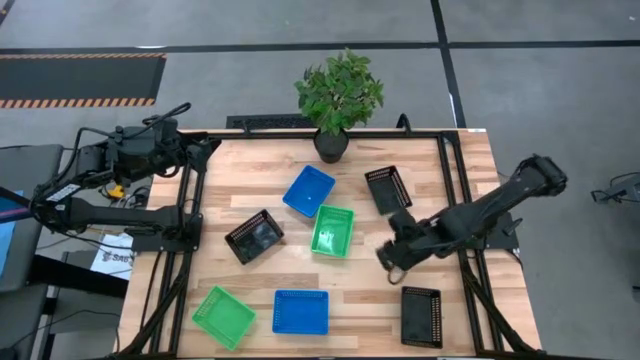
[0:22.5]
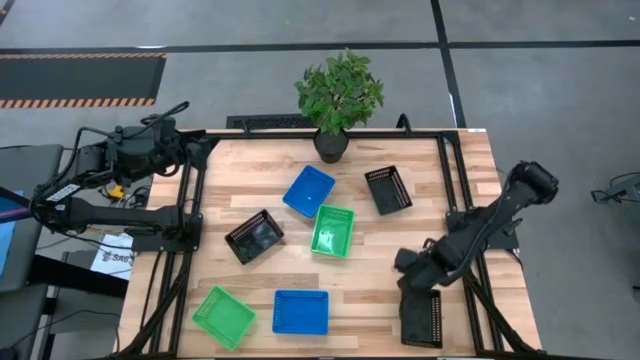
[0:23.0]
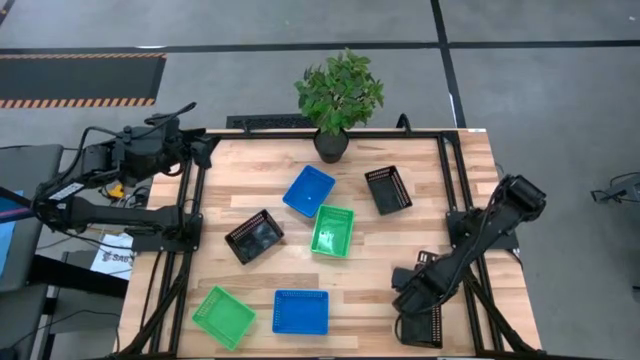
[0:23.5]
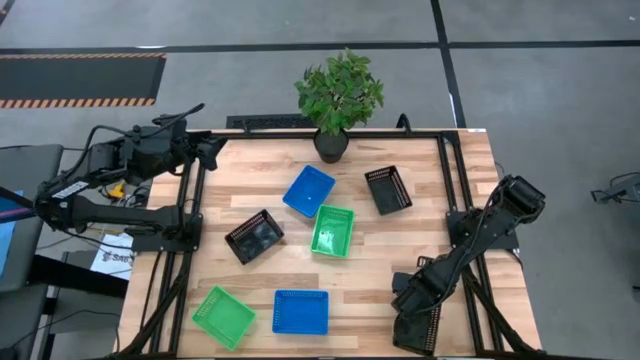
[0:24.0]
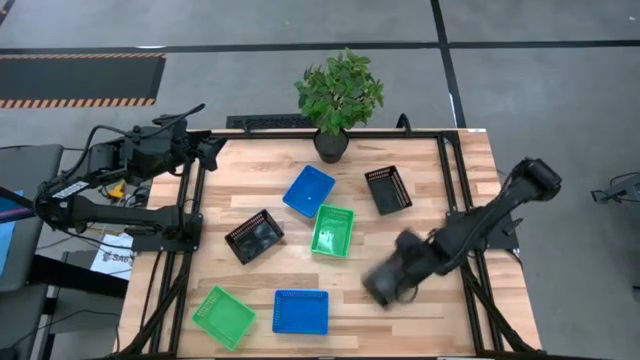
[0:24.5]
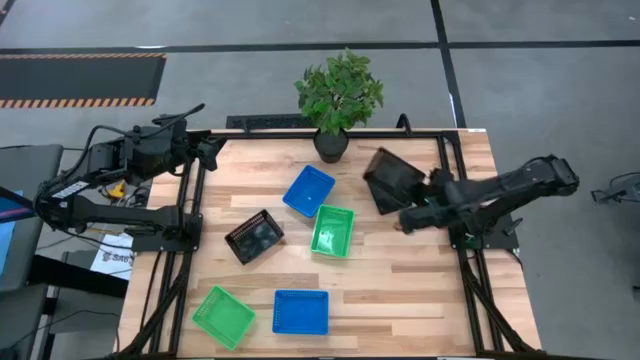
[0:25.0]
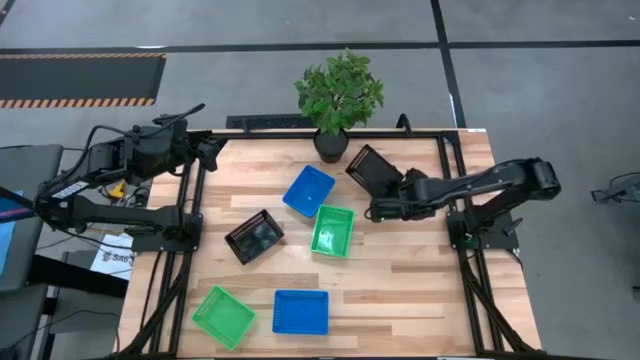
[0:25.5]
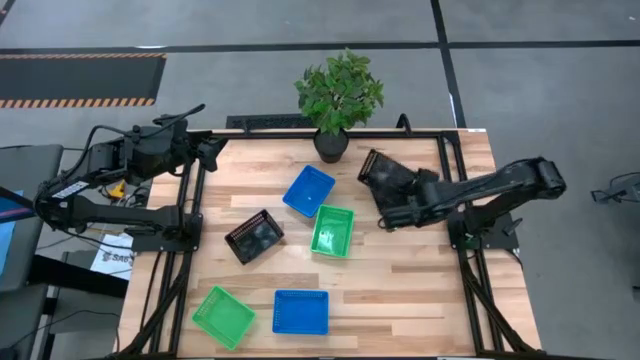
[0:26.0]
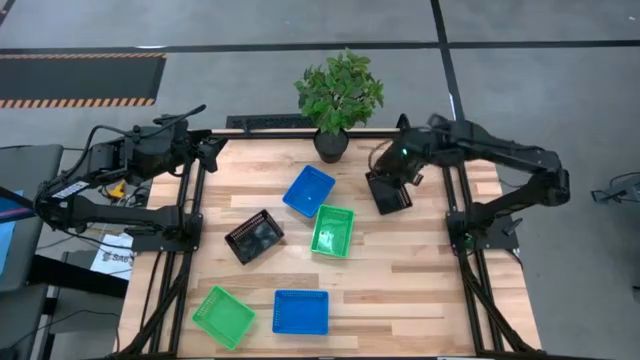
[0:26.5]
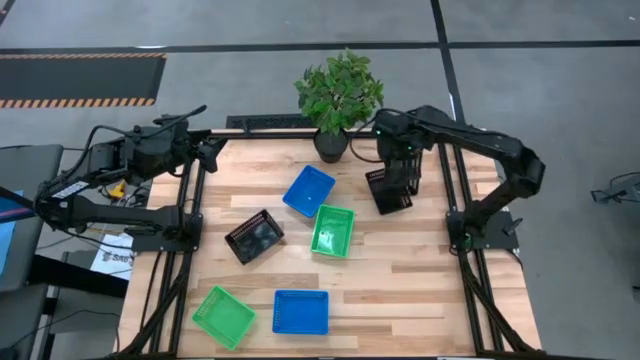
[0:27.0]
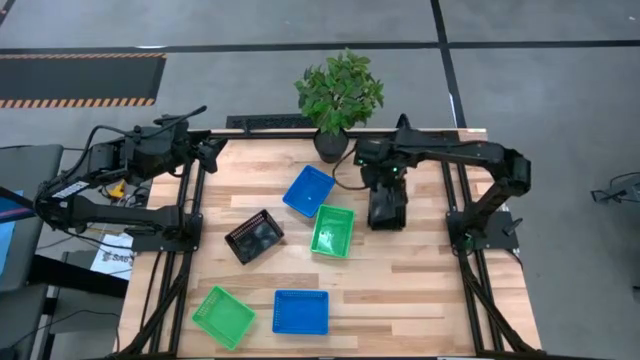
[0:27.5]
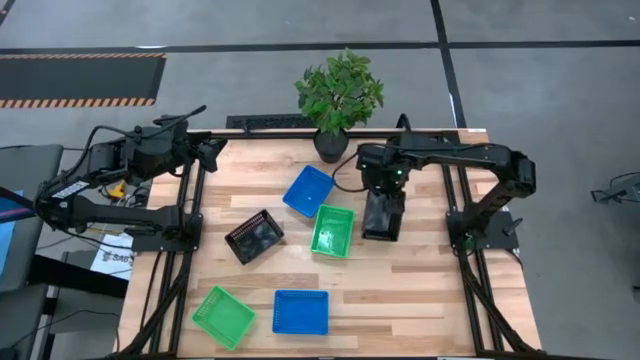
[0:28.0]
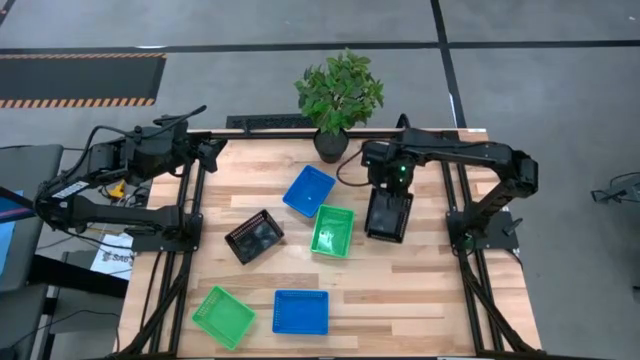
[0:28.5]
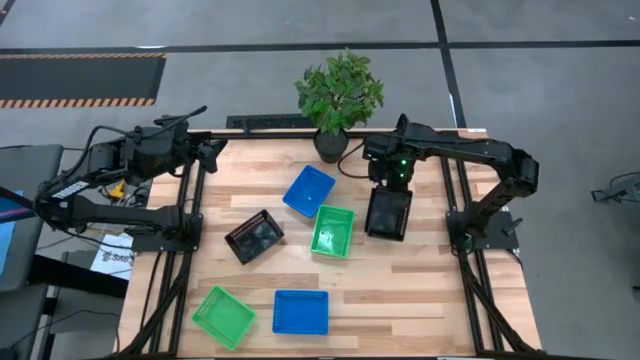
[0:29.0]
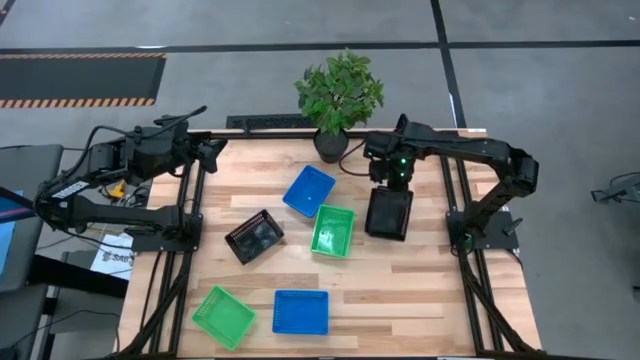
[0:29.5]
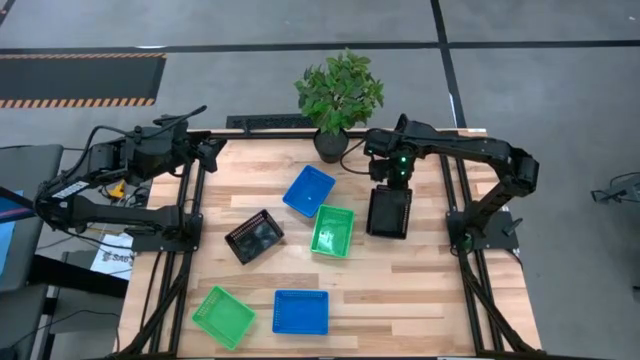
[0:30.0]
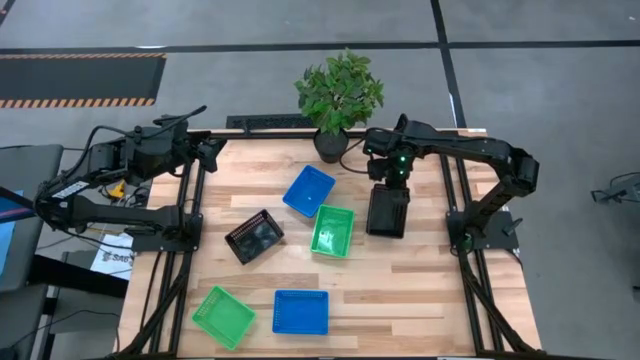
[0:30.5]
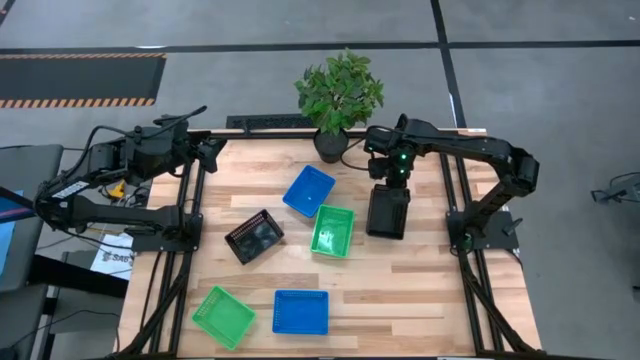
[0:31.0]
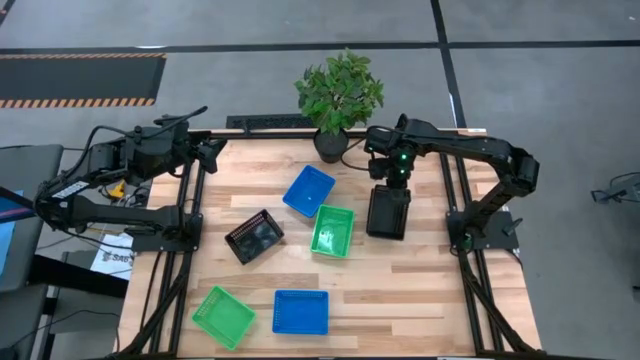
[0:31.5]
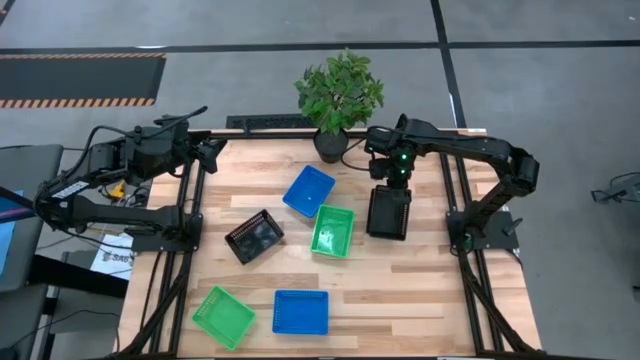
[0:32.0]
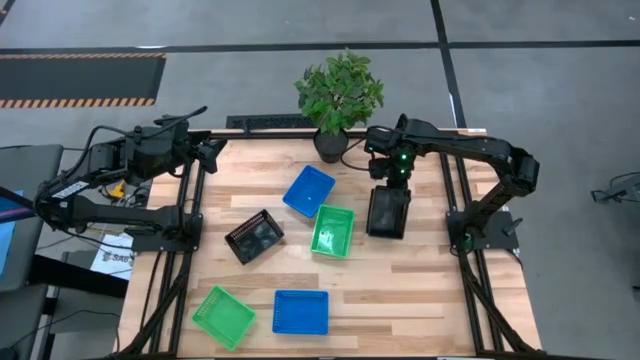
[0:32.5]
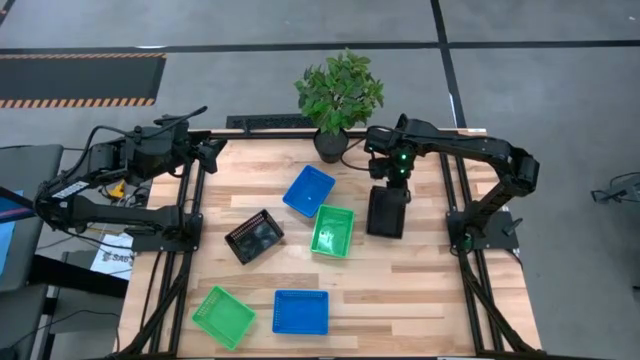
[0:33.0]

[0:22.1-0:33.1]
Stack the bottom black bin on the top right black bin

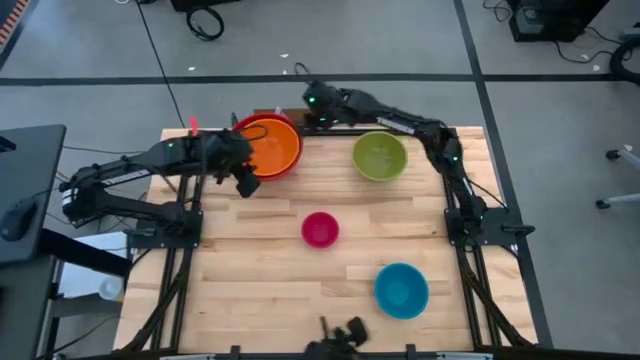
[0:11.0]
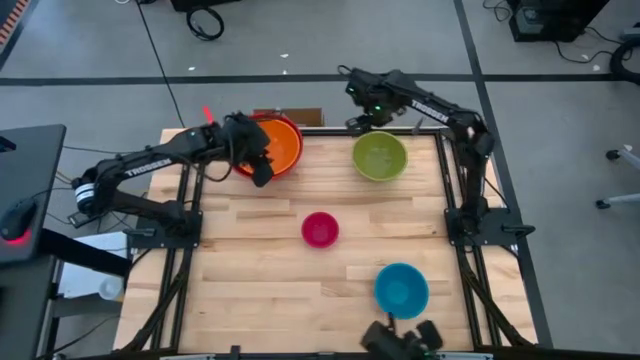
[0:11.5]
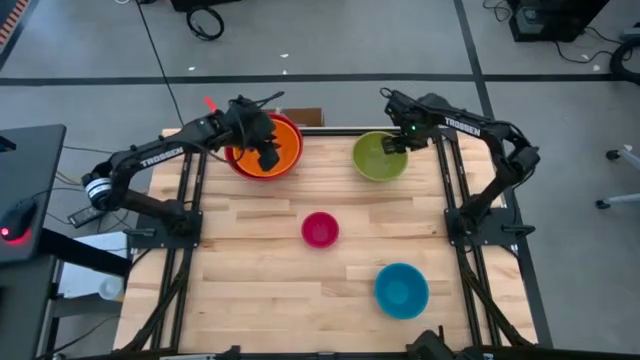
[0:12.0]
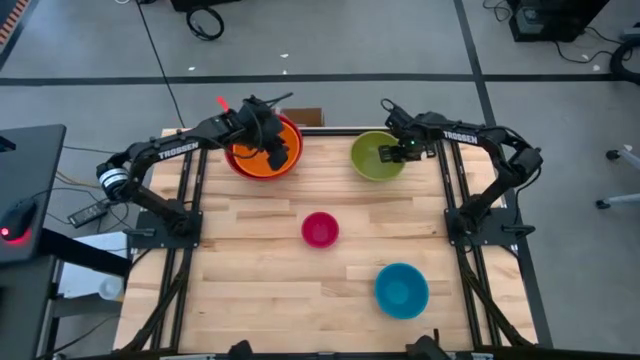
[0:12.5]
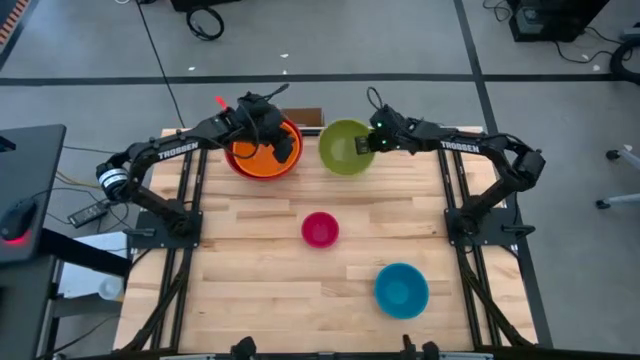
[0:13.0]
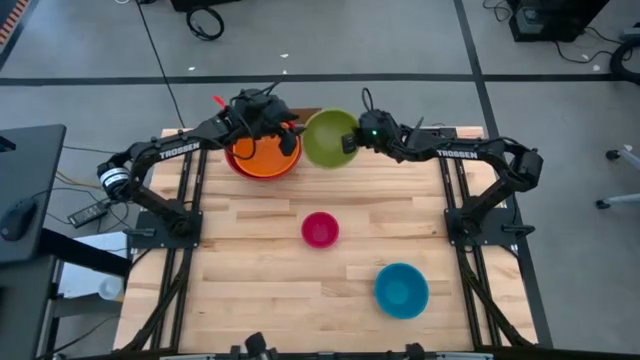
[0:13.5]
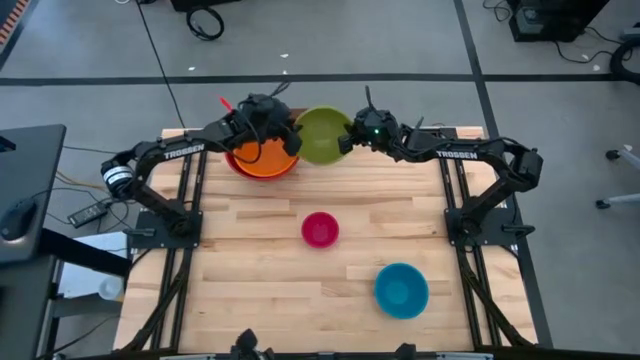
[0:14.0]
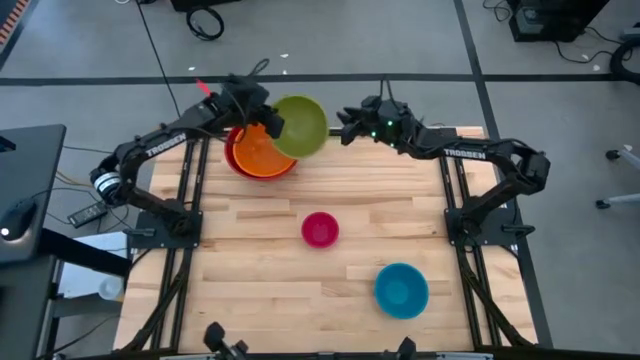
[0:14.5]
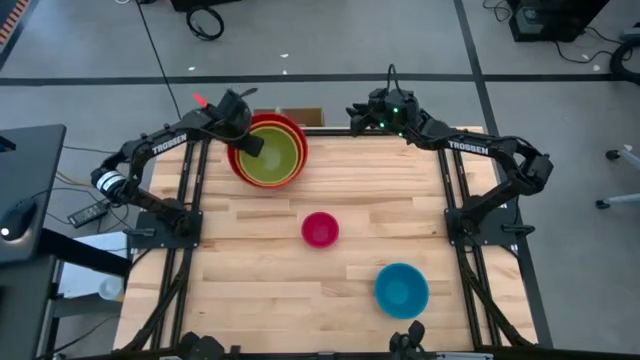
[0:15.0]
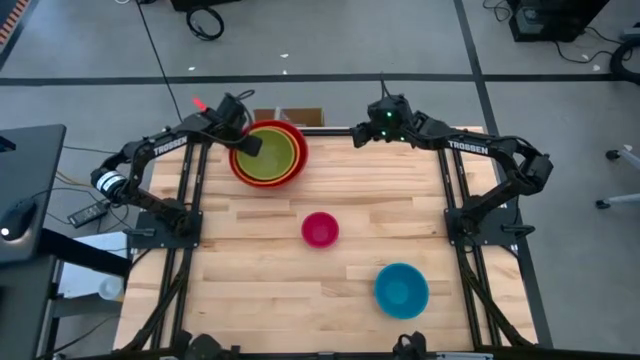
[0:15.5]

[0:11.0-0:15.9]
Stack the green bowl on top of the orange bowl

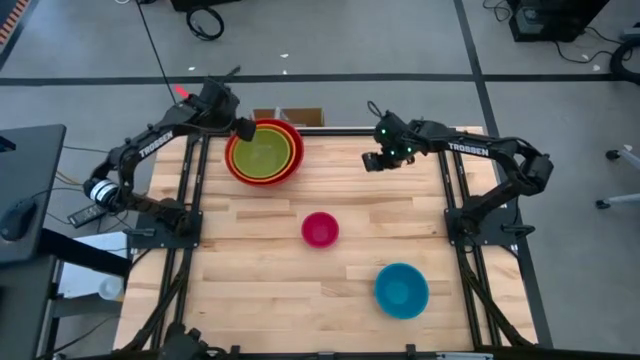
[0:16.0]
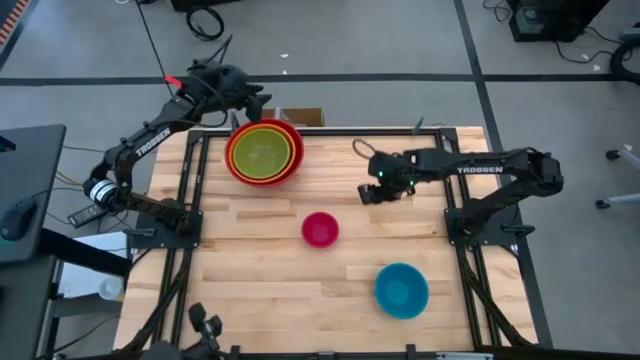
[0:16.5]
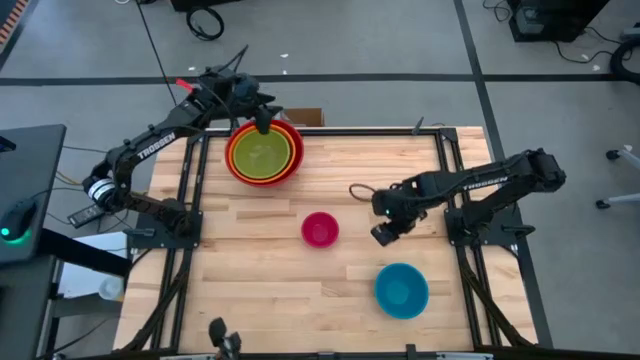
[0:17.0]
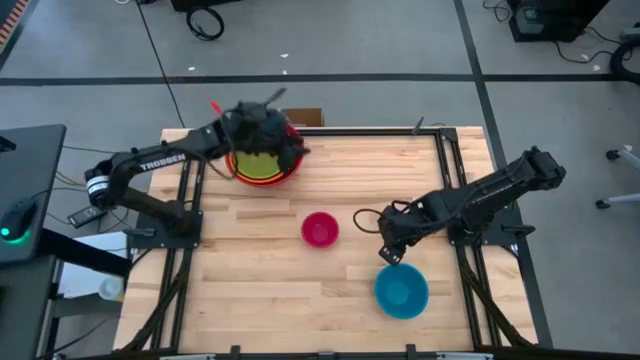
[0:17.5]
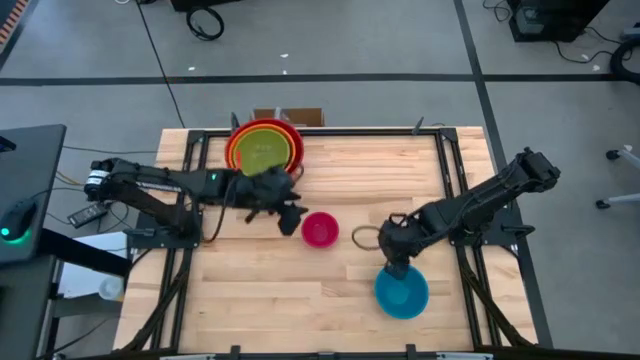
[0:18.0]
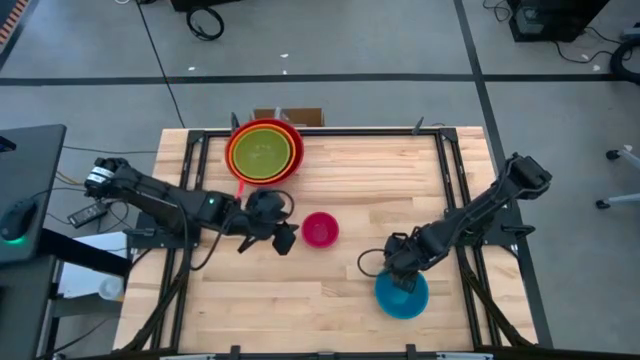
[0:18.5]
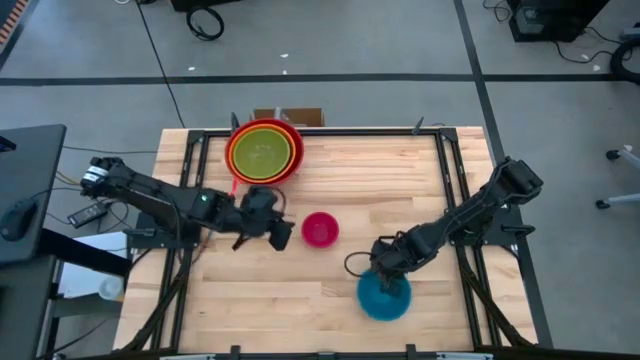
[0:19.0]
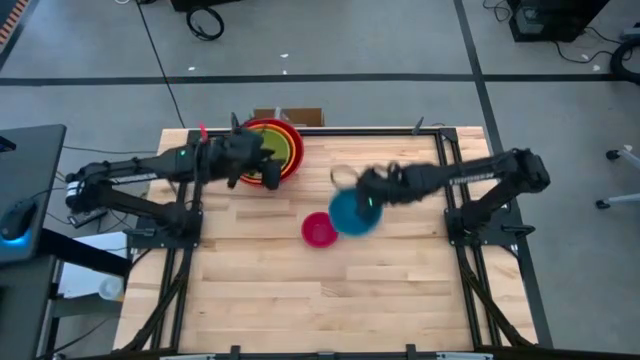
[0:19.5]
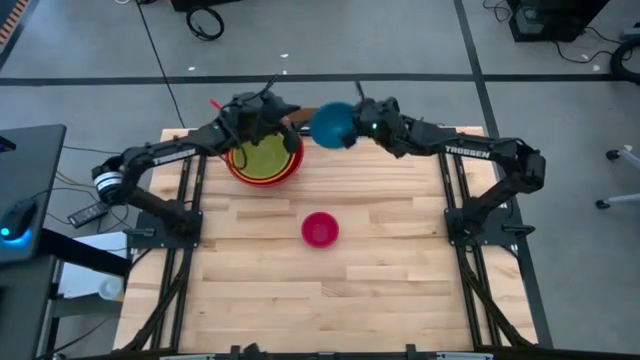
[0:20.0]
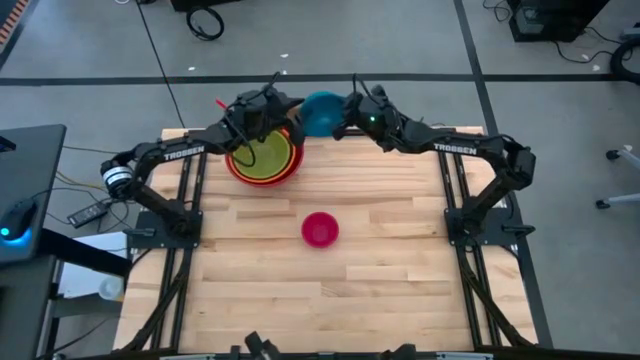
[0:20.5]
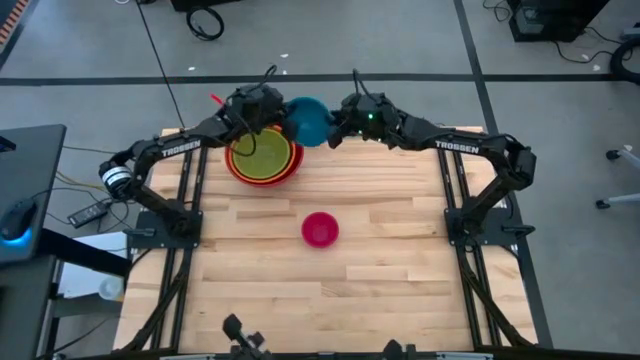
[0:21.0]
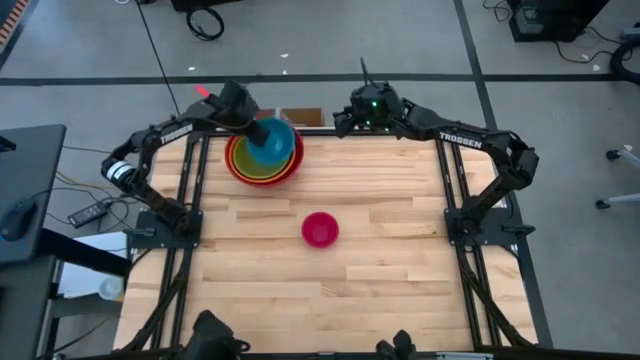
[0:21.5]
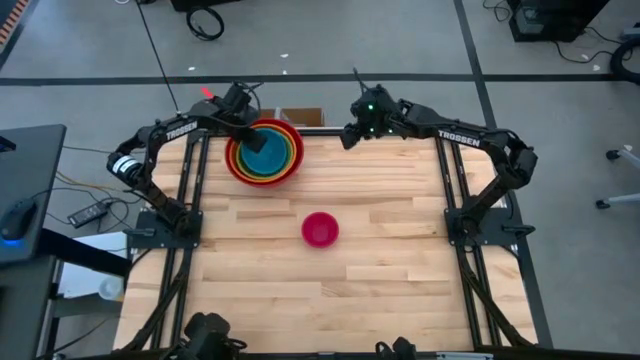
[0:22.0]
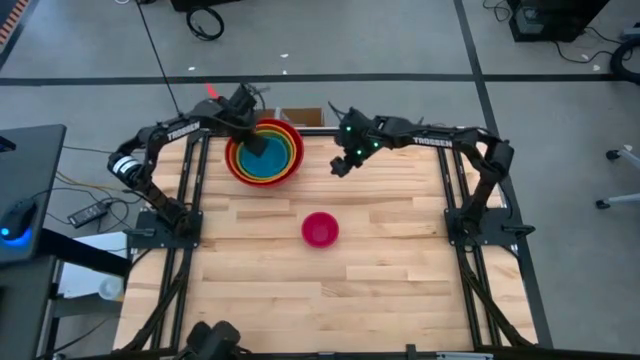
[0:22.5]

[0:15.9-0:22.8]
Stack the blue bowl on top of the green bowl
